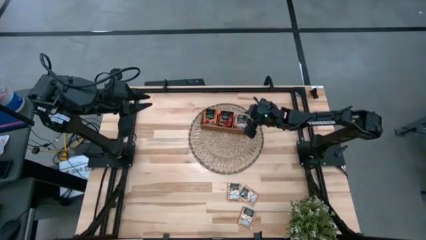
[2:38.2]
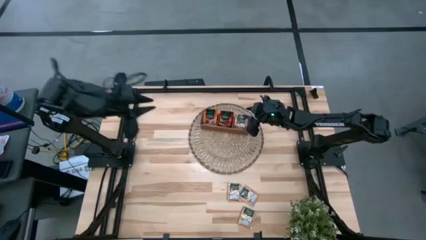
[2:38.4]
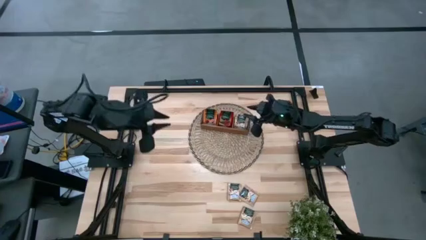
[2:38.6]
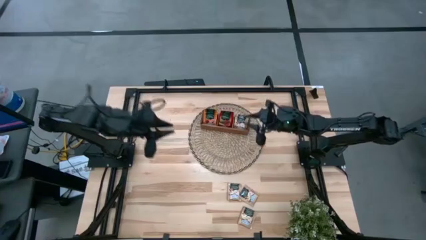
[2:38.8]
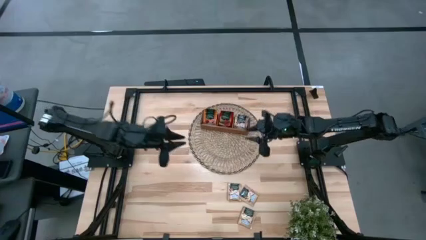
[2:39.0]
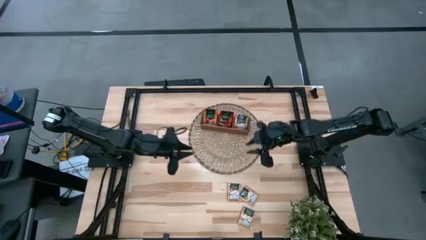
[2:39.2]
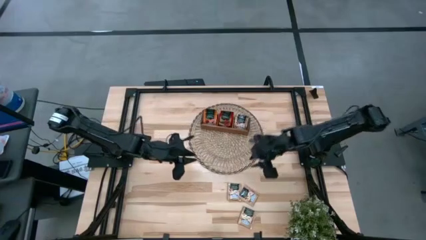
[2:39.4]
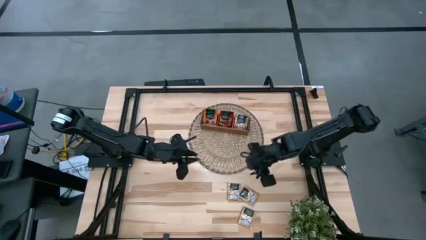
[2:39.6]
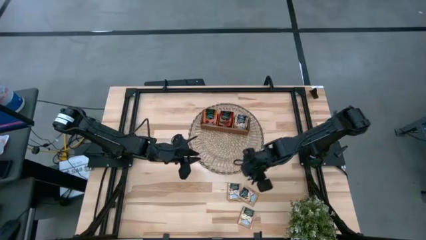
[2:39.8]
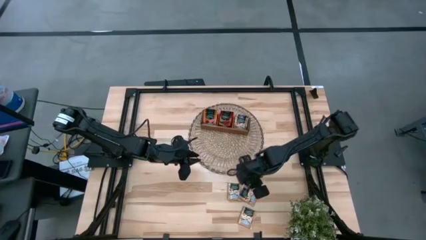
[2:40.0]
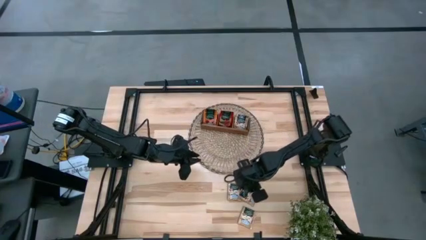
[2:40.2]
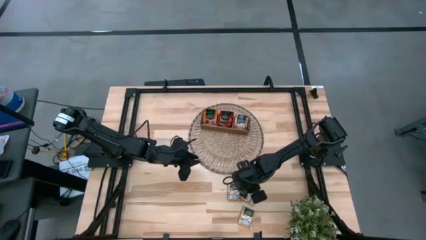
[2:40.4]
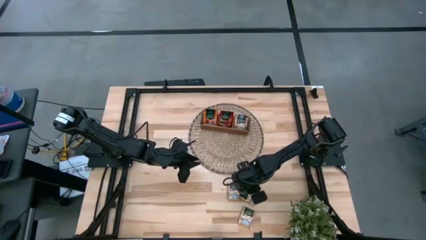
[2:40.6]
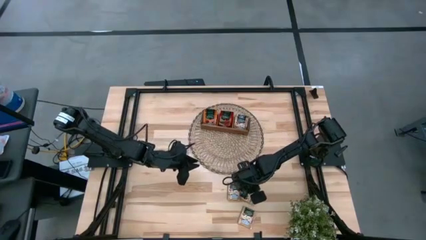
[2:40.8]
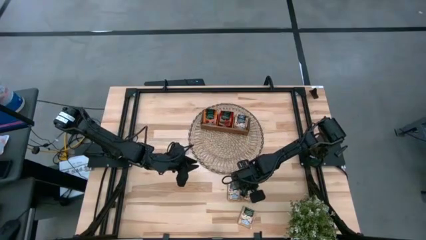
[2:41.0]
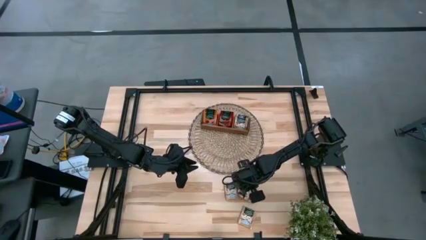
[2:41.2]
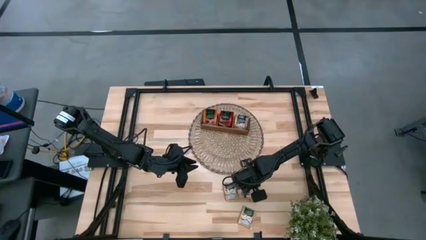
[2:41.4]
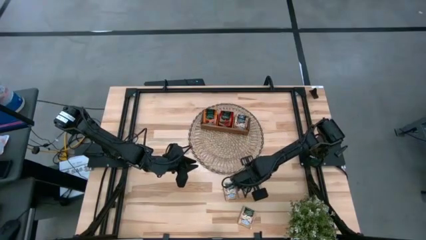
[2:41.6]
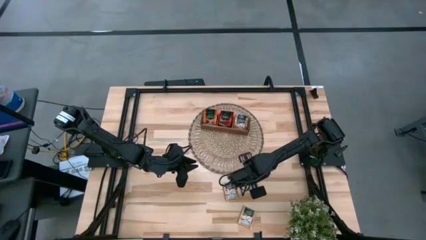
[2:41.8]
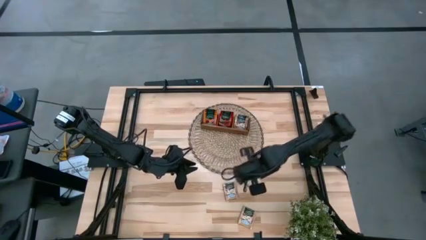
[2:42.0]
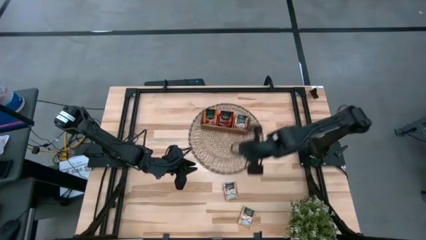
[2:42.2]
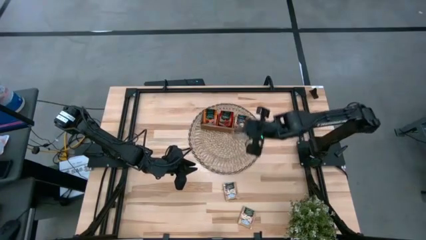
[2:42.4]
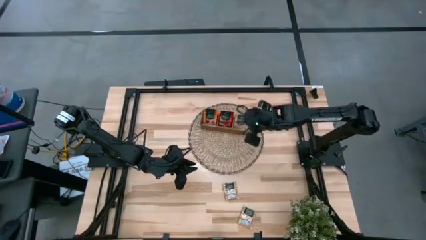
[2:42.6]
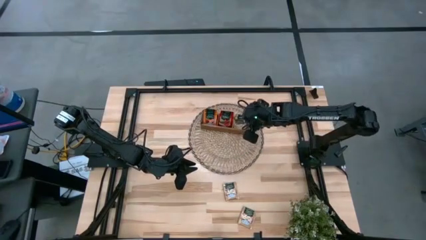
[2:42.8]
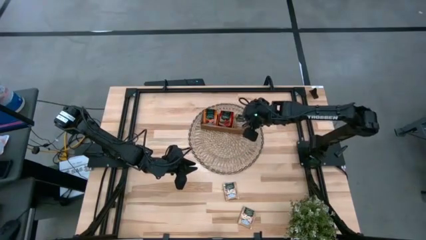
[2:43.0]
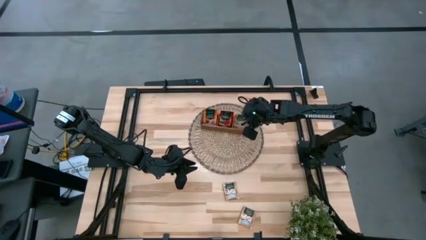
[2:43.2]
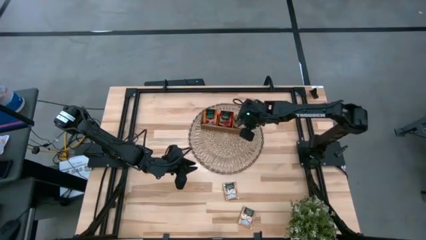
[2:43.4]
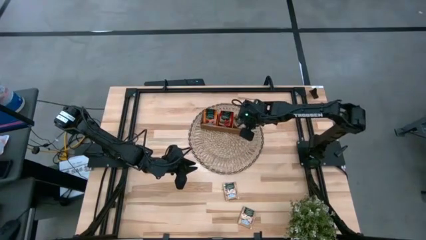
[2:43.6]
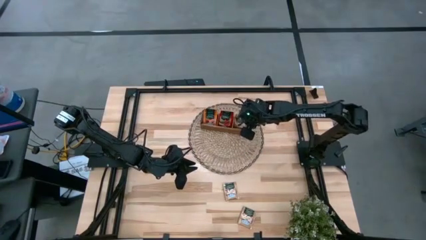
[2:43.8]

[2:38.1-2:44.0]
Task: Pick & Place Tea
Put the brown tea bag into the right section of the wooden organizer

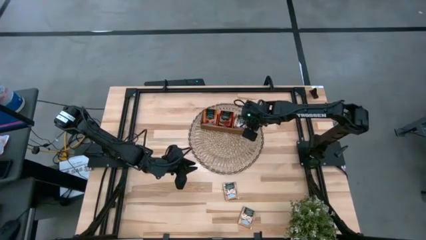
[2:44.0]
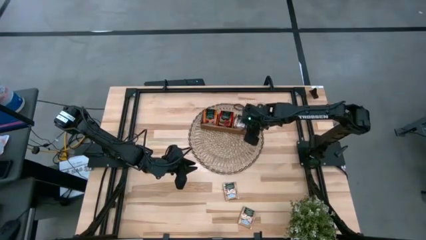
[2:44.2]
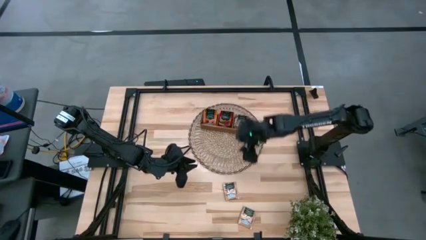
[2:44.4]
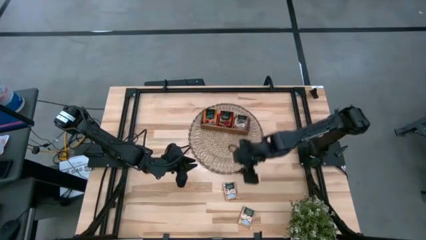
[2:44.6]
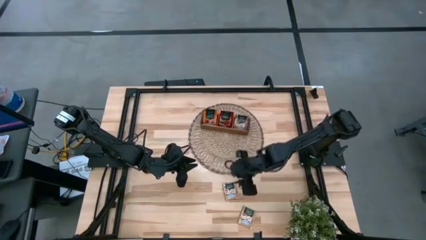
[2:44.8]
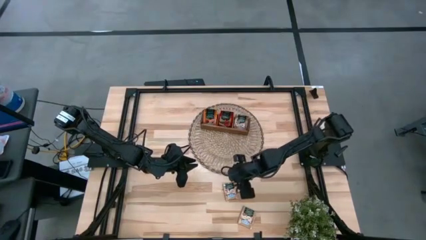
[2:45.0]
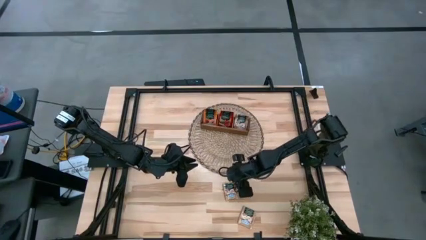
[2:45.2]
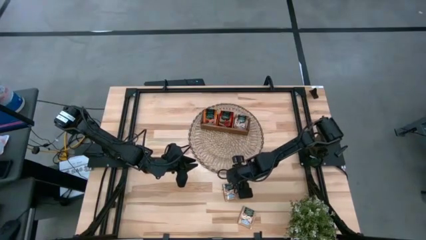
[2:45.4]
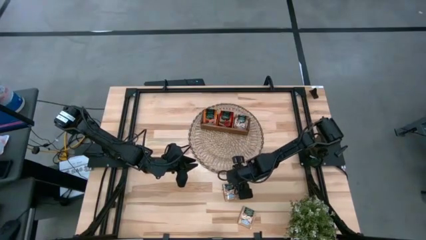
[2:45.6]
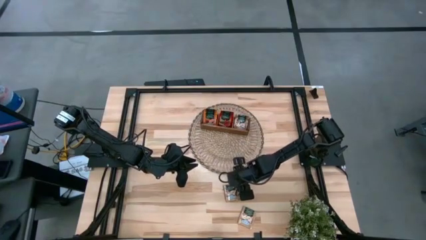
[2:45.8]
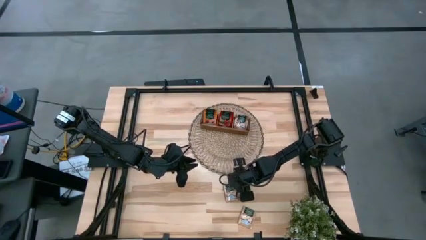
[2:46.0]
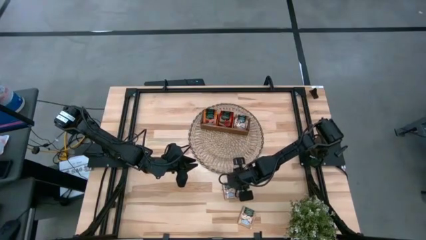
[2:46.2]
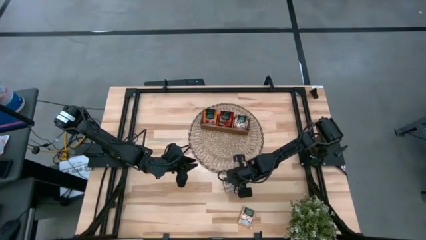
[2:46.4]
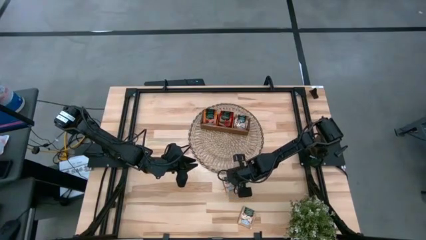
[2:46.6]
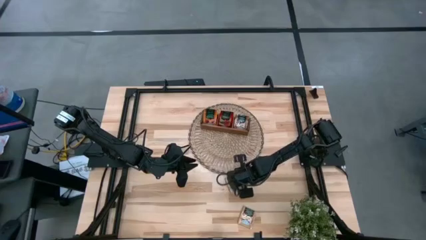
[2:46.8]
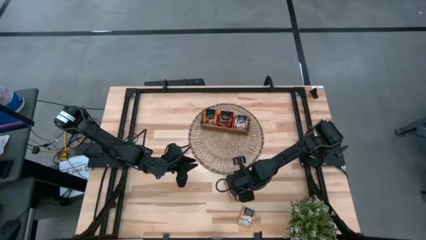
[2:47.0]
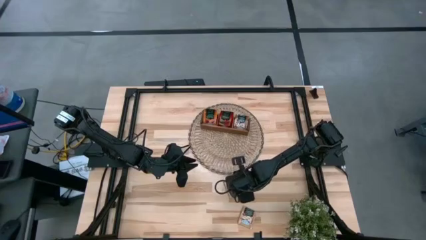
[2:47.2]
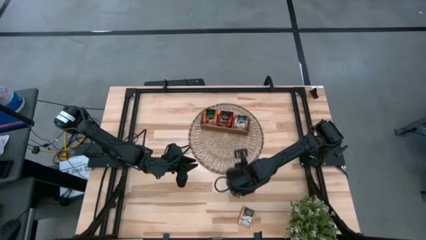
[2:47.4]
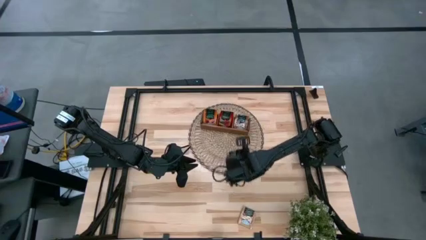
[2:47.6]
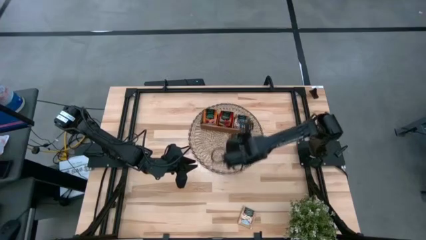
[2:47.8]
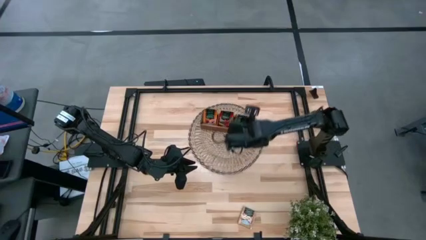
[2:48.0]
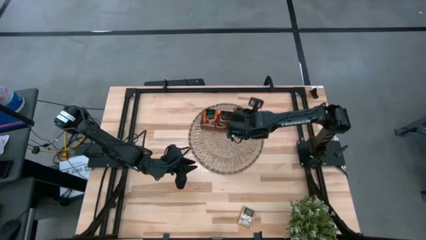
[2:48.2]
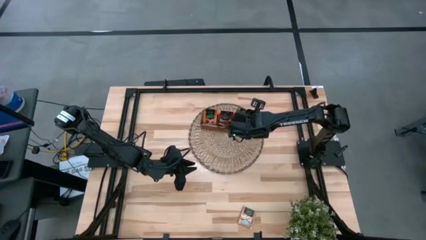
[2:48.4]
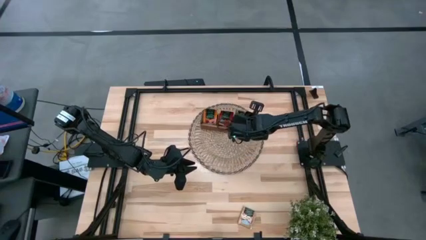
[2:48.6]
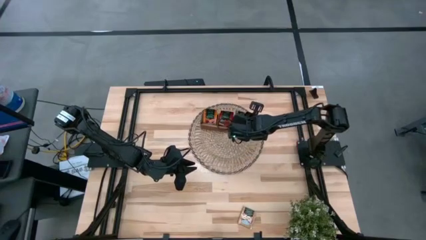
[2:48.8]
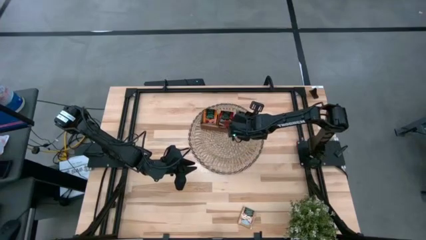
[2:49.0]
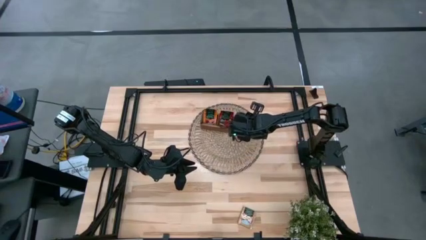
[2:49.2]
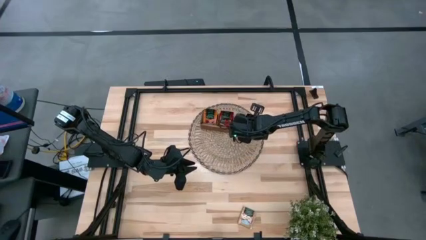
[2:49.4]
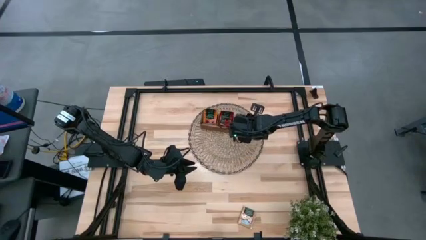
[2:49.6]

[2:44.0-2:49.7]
Put the brown tea bag into the right section of the wooden organizer

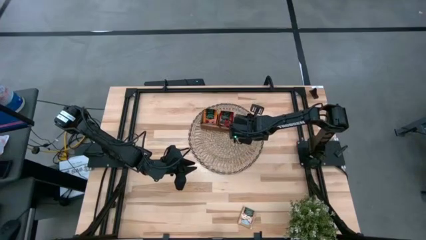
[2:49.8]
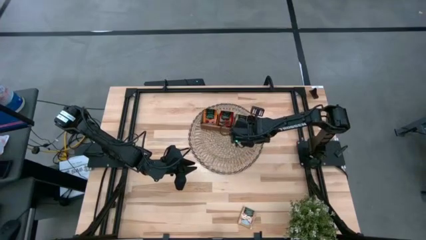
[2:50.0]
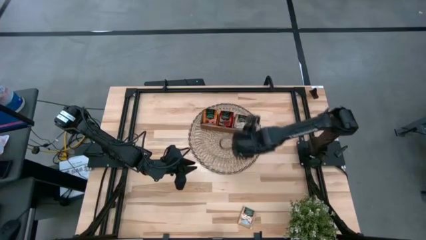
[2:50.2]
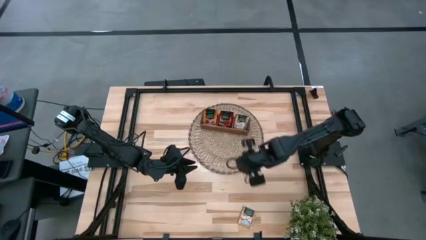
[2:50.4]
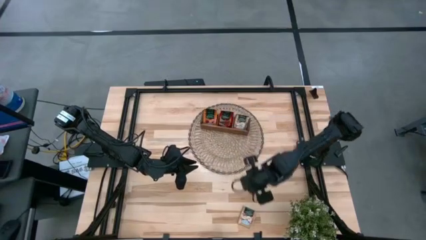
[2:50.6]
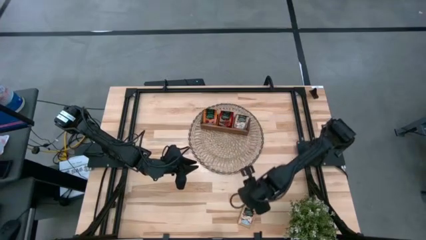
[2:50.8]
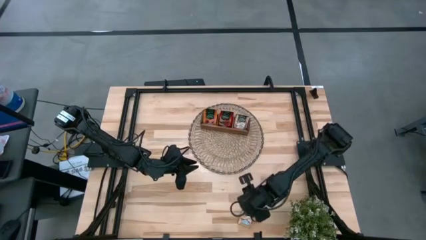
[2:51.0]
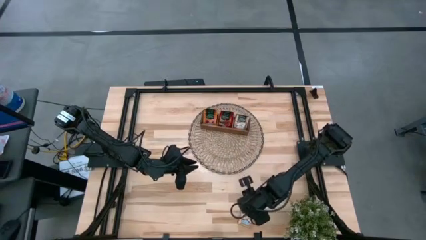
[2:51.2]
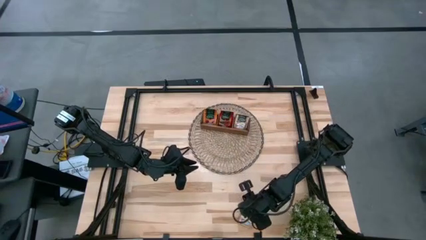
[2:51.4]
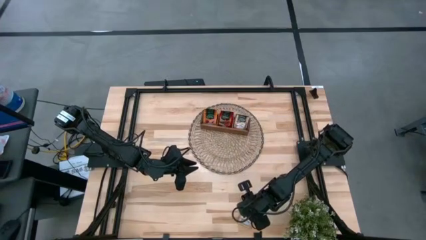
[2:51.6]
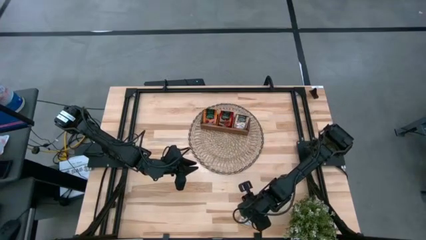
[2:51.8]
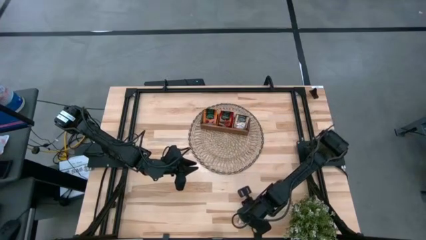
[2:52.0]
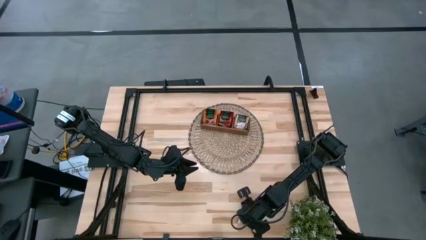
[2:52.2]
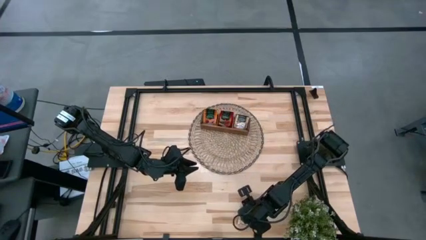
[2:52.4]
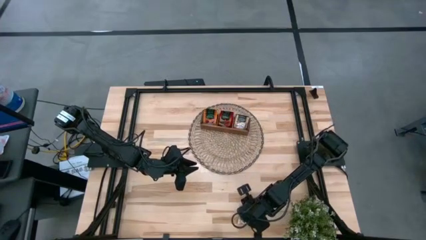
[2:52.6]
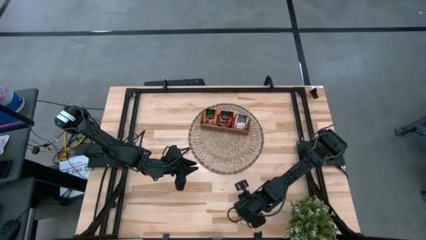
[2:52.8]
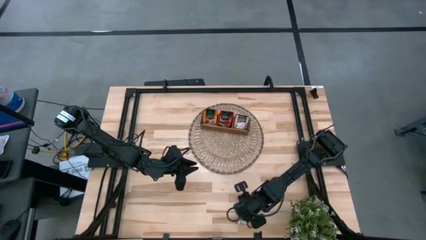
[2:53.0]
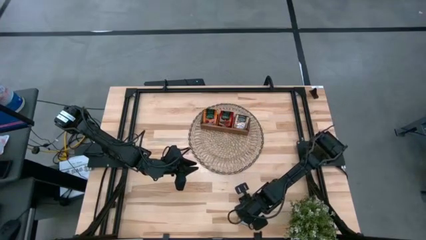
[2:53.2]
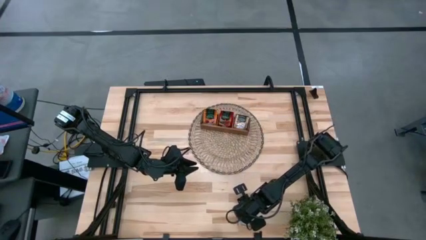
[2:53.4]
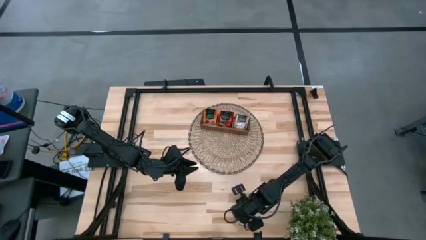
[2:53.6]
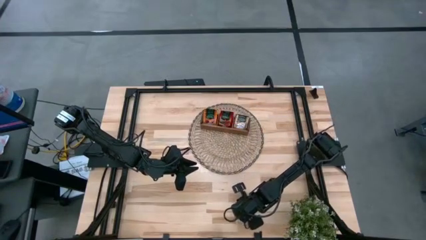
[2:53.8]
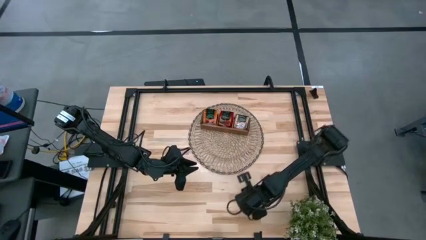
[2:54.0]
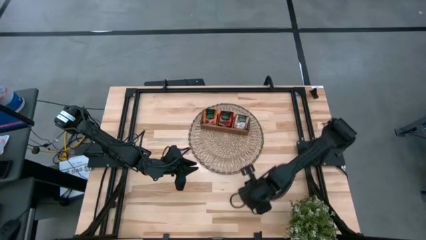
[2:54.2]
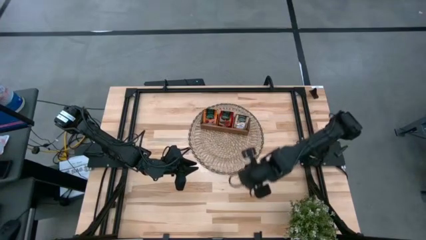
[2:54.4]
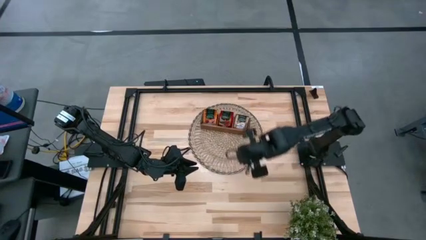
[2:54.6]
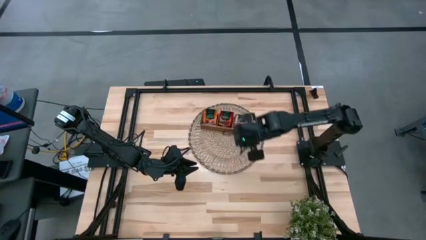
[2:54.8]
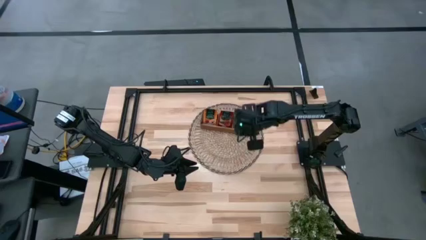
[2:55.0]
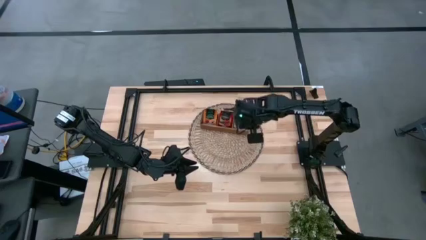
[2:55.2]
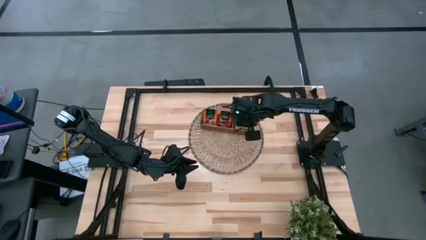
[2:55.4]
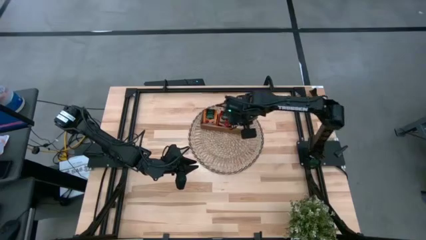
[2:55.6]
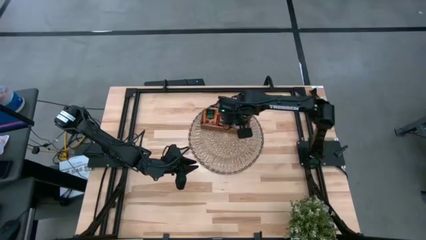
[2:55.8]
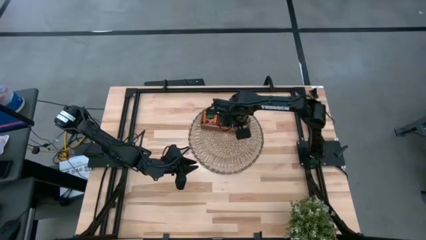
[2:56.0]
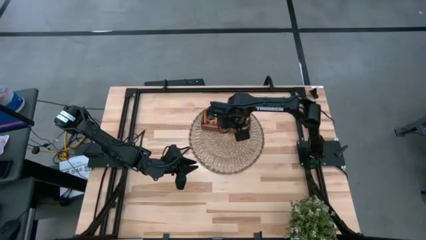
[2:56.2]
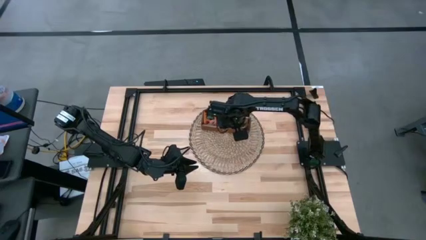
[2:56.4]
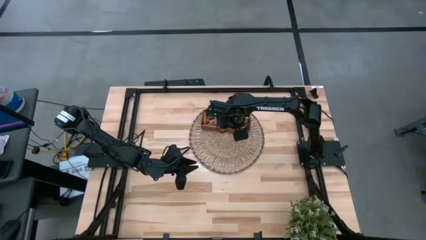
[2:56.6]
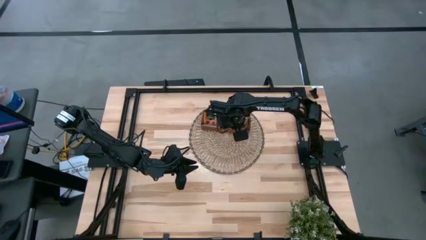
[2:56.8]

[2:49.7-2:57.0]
Put the brown tea bag into the right section of the wooden organizer
